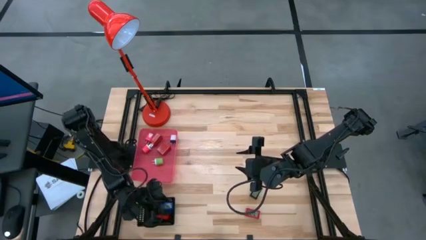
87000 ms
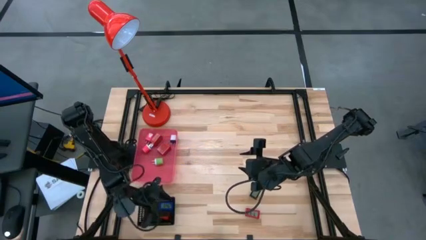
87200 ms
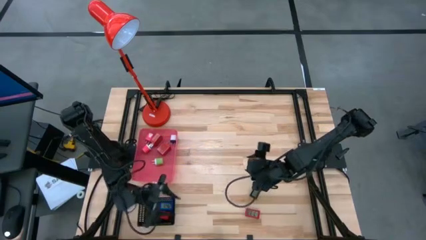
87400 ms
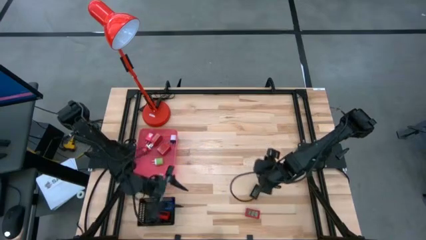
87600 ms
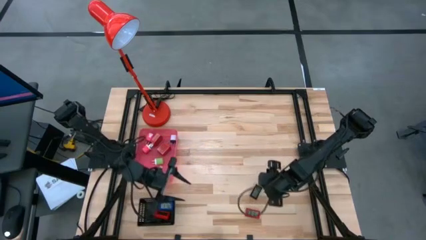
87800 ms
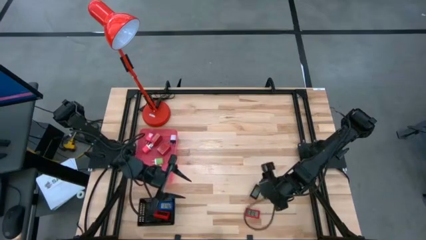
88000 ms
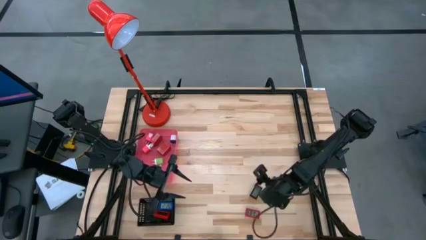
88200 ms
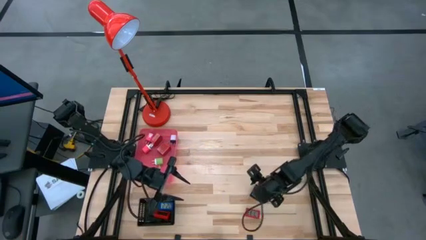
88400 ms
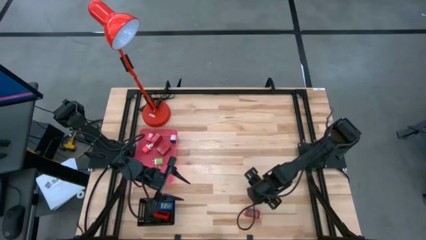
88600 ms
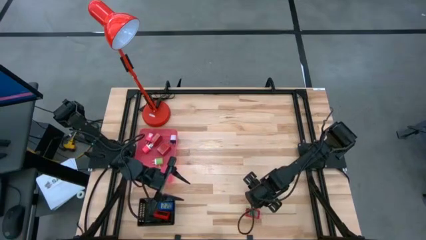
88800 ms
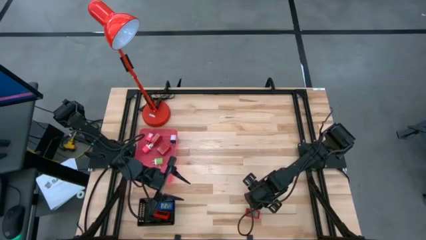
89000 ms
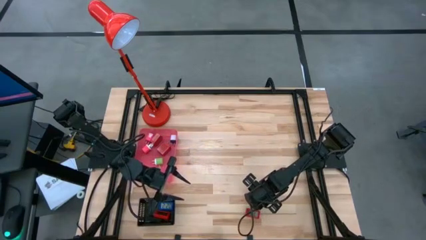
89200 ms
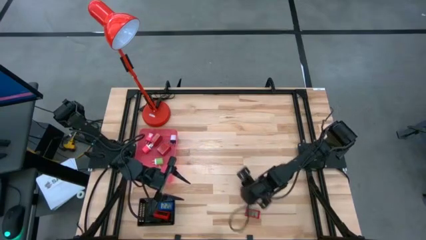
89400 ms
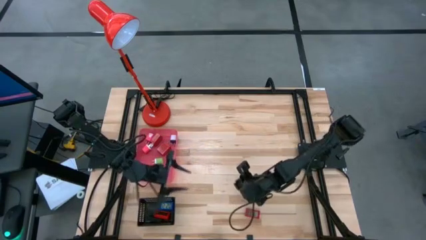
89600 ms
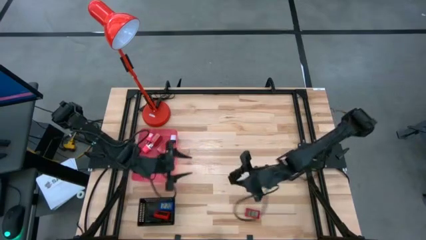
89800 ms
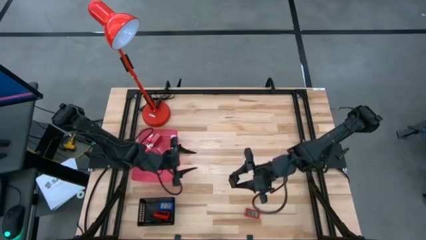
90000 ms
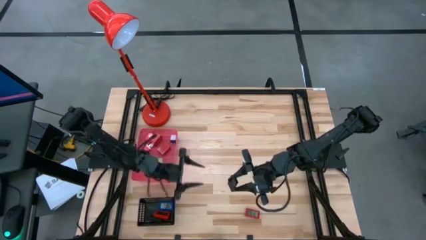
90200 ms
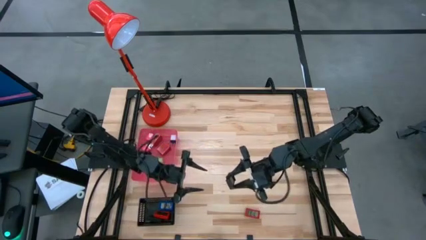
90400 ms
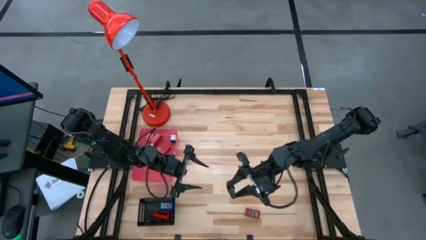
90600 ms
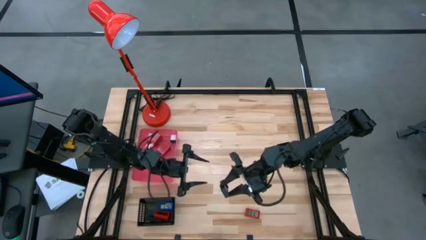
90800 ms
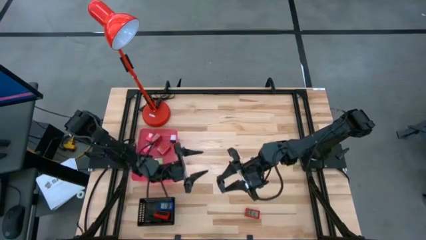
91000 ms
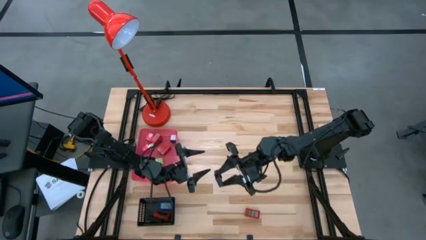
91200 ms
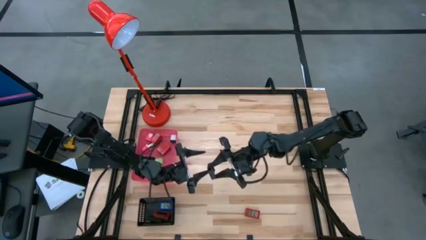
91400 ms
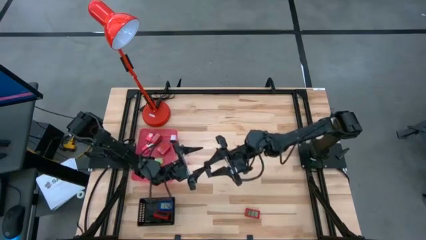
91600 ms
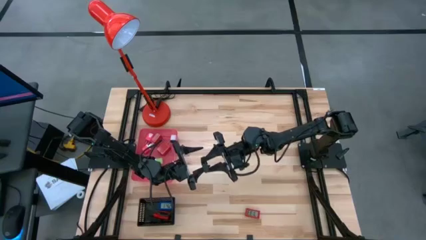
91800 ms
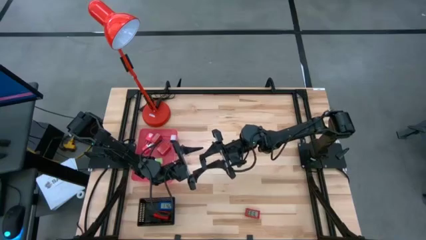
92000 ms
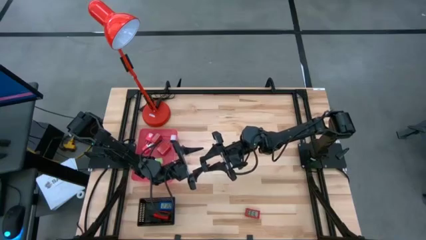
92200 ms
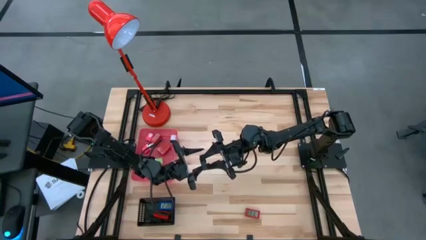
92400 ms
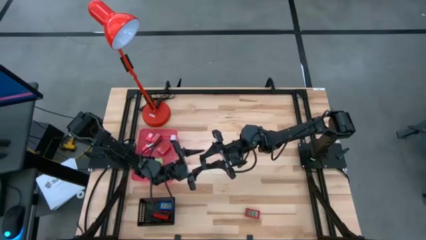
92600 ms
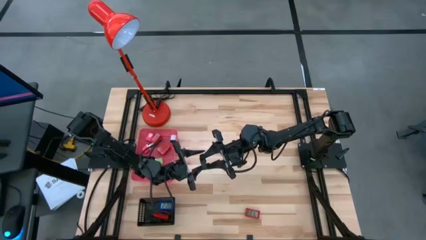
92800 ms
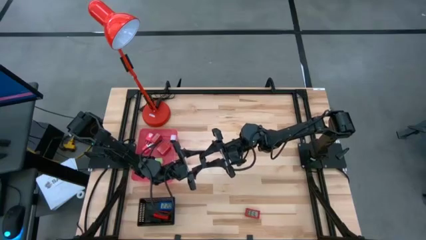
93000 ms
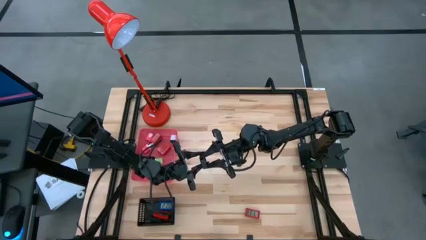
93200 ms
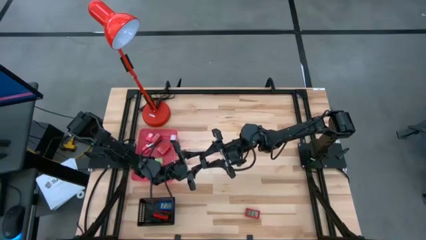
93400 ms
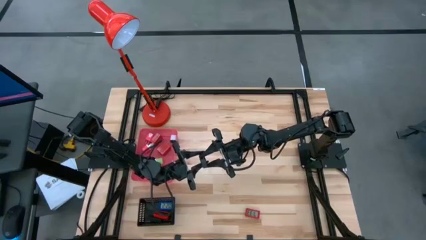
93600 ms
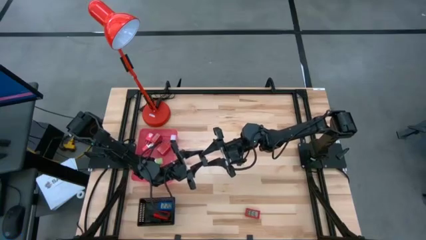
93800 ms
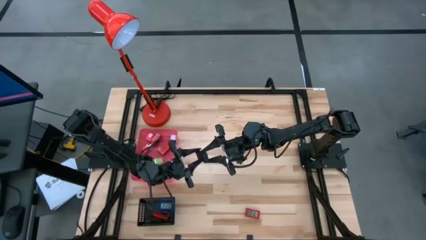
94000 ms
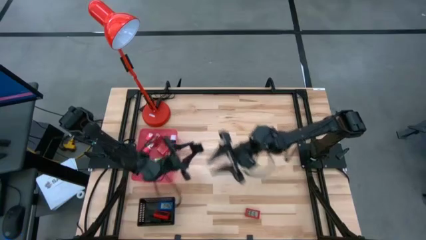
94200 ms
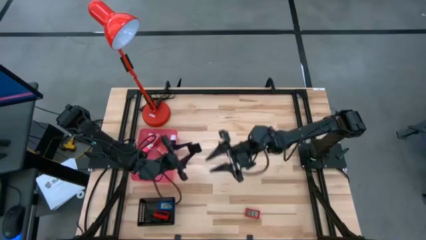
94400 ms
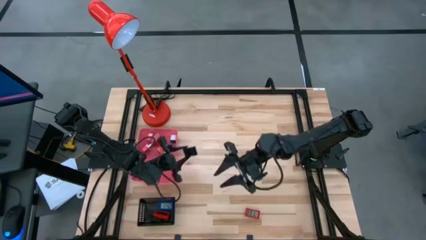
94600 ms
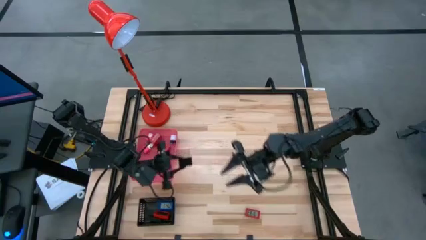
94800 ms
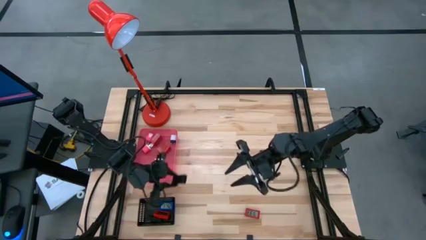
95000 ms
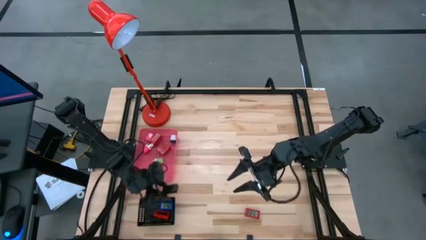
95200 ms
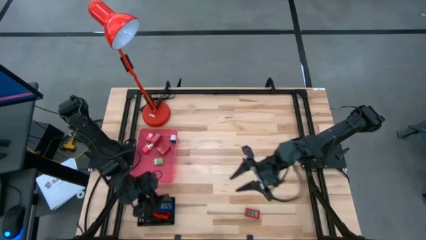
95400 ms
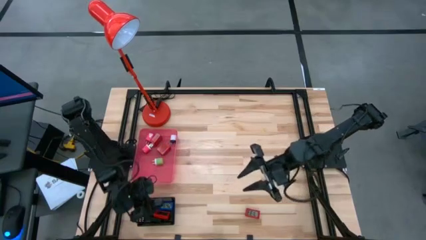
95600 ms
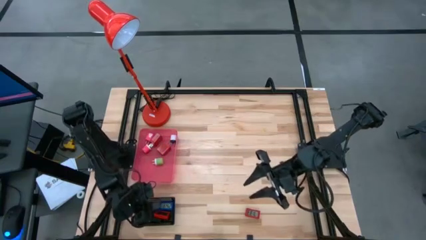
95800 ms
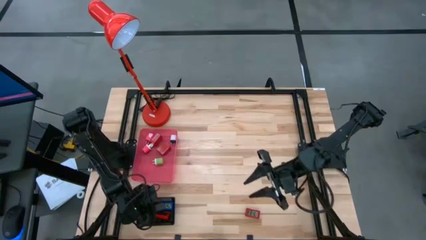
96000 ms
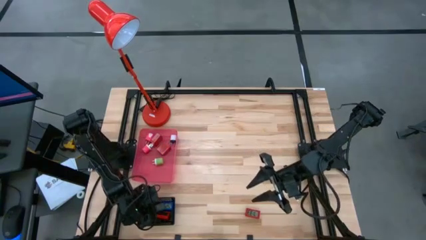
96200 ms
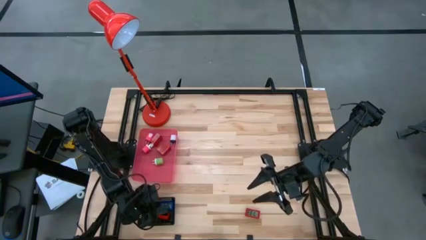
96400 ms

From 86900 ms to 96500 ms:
Task: Pick & Place Office items
Put the black digital timer into the black bin

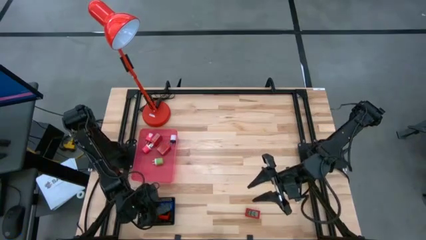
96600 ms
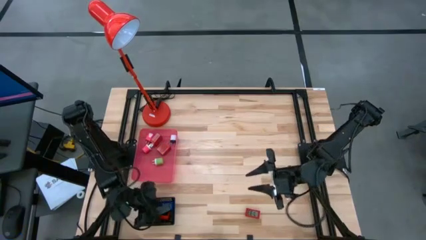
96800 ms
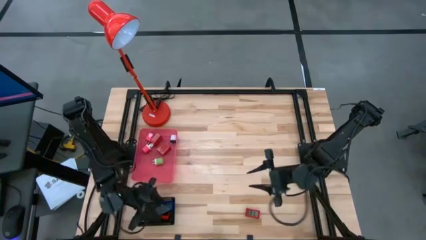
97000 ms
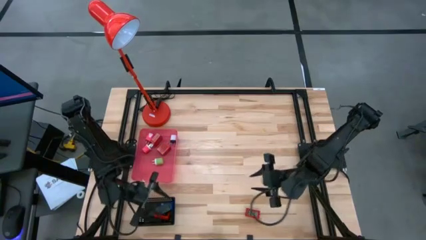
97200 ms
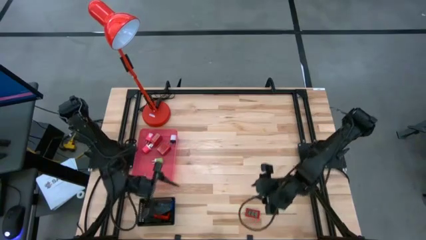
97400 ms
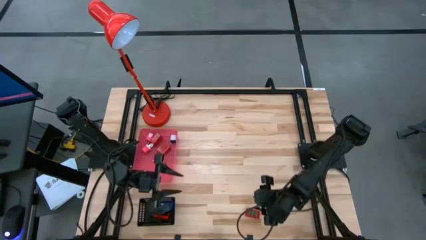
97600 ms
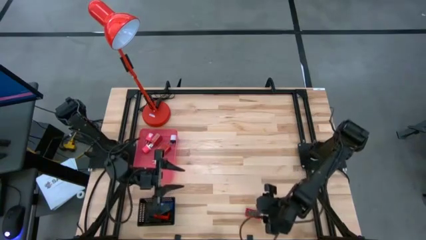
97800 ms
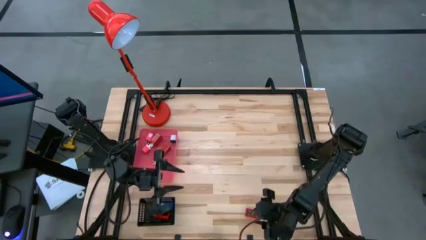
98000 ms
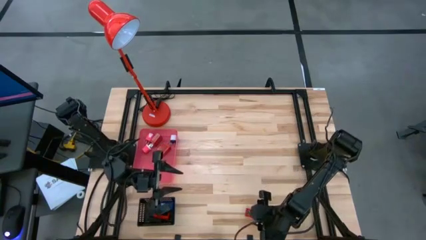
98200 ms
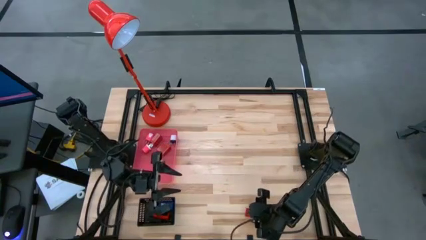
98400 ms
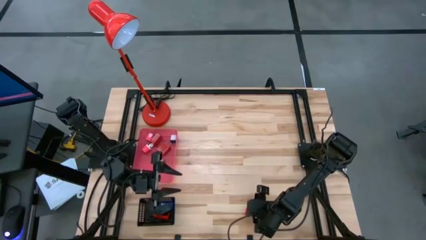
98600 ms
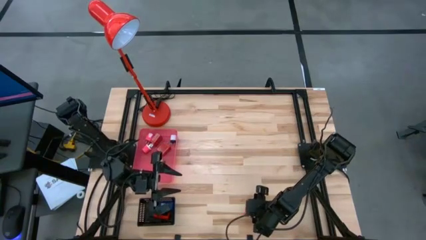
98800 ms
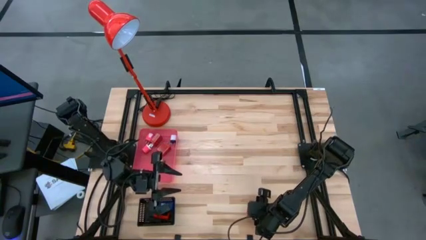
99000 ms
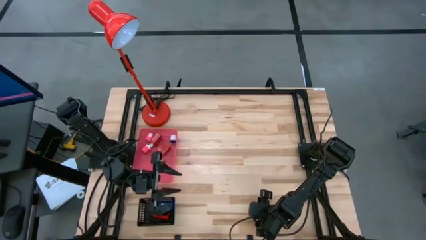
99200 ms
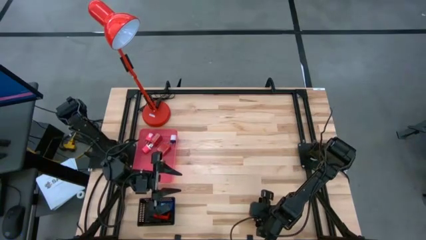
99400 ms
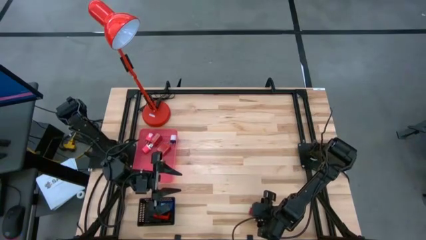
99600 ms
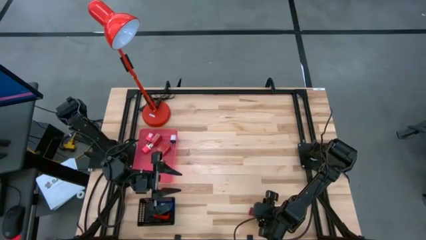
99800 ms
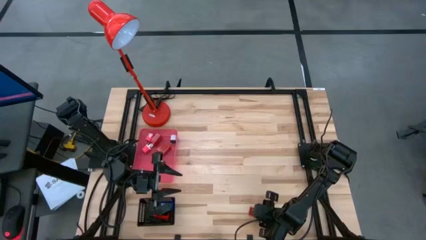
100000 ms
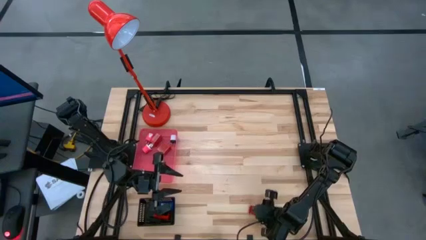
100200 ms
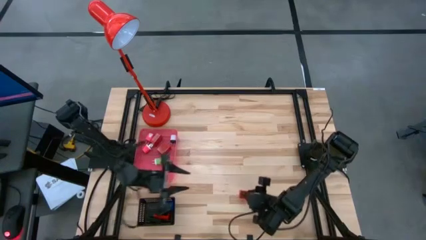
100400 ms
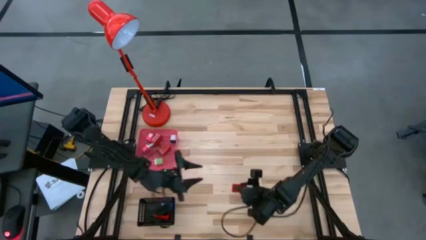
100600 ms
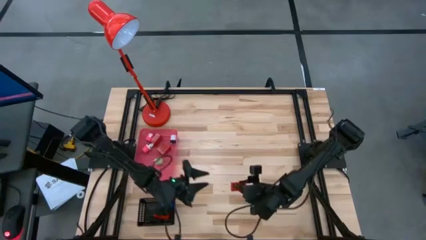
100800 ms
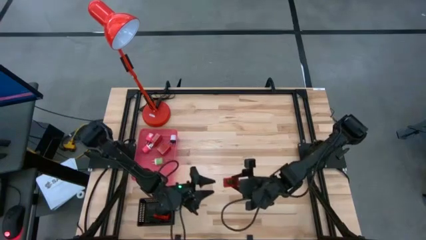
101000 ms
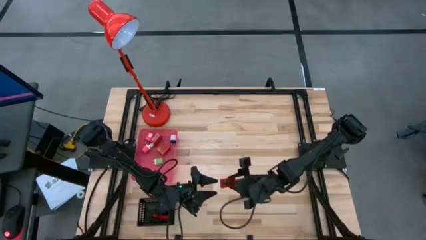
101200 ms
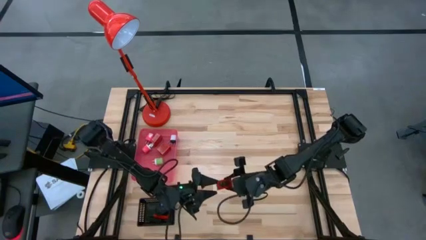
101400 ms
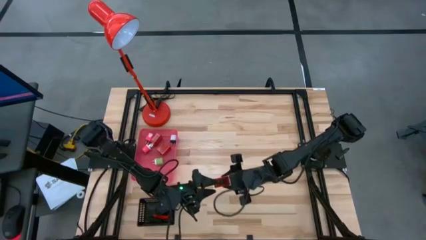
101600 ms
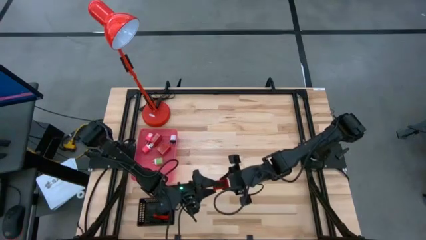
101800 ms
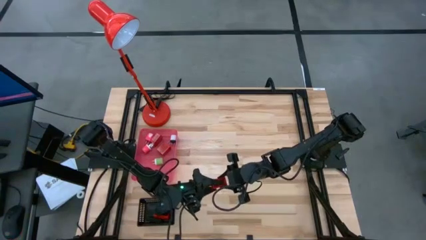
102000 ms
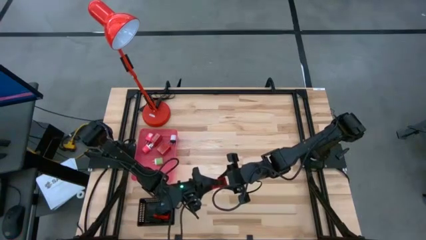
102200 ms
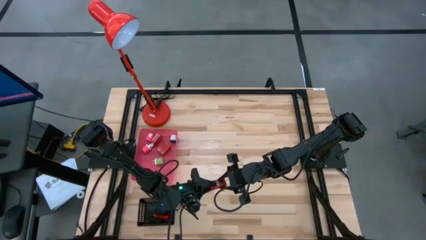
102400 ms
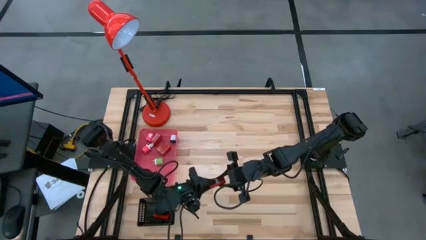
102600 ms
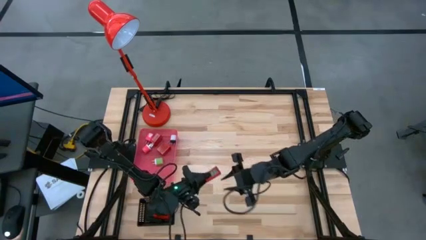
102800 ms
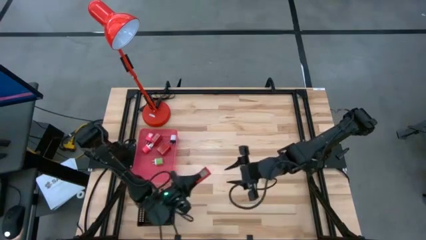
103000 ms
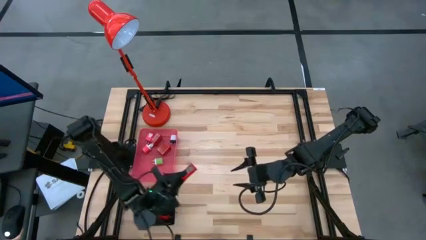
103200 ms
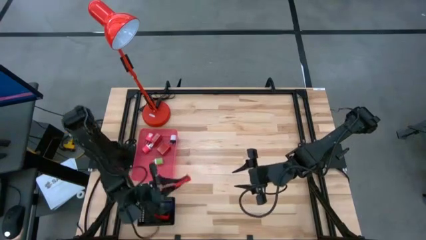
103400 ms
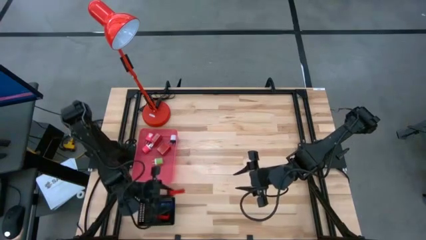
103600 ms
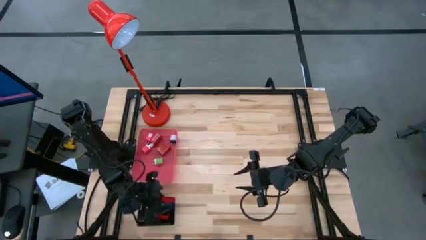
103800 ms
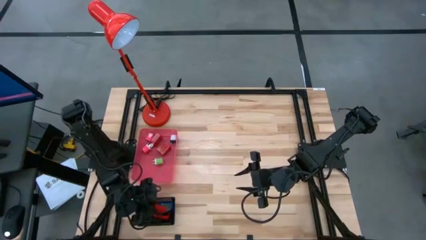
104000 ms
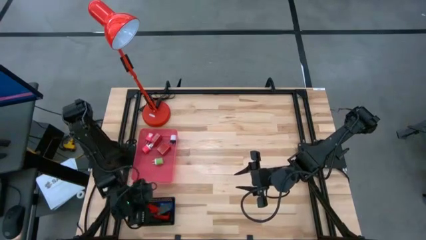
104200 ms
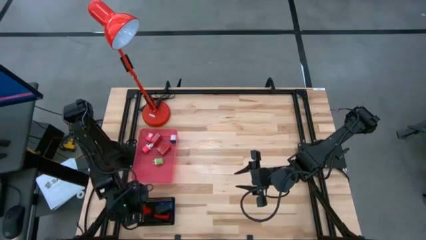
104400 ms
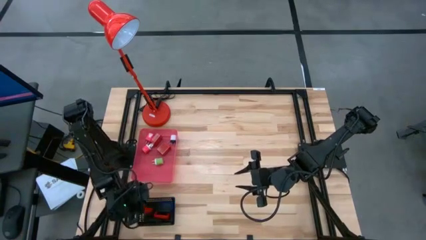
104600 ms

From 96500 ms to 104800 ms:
Put the red digital timer into the black bin
